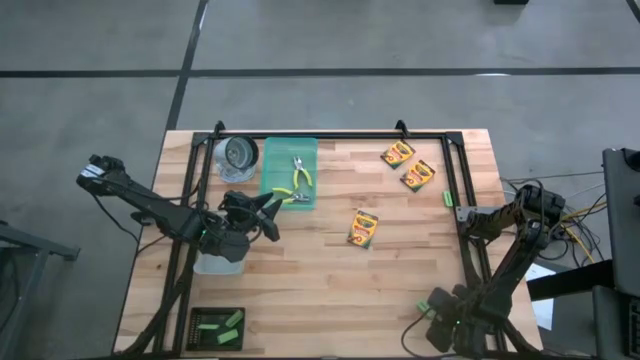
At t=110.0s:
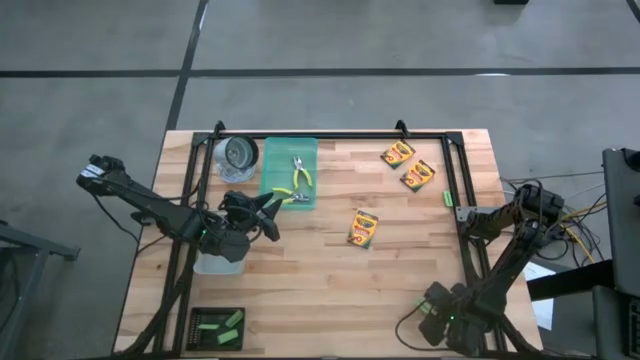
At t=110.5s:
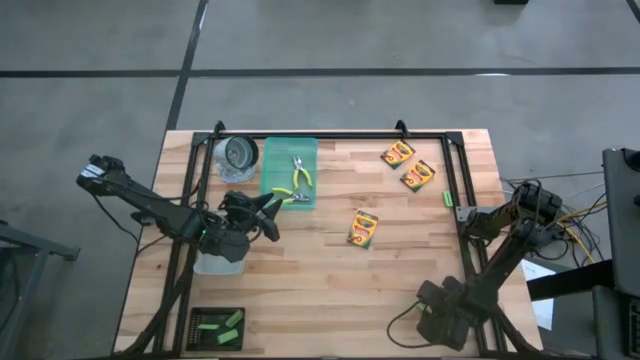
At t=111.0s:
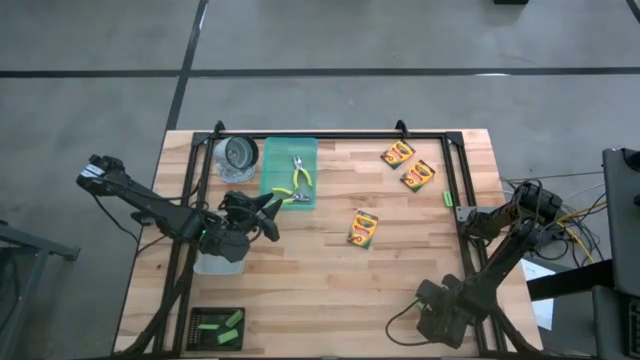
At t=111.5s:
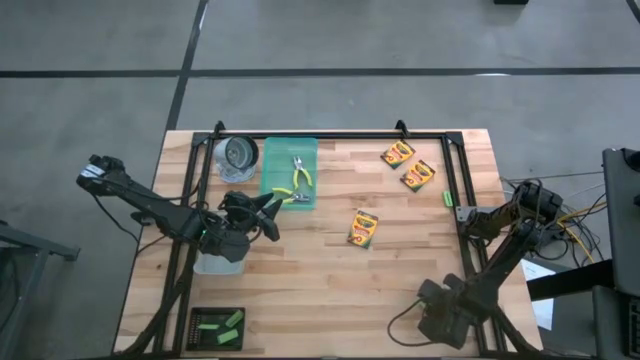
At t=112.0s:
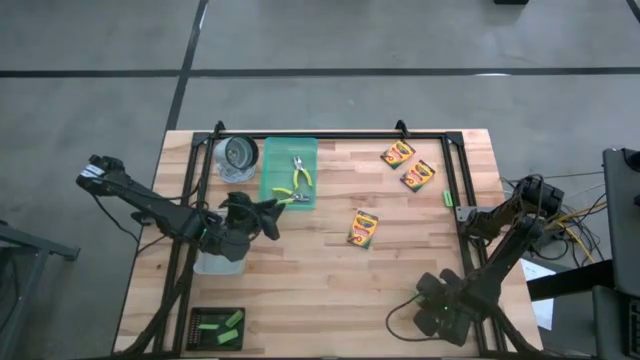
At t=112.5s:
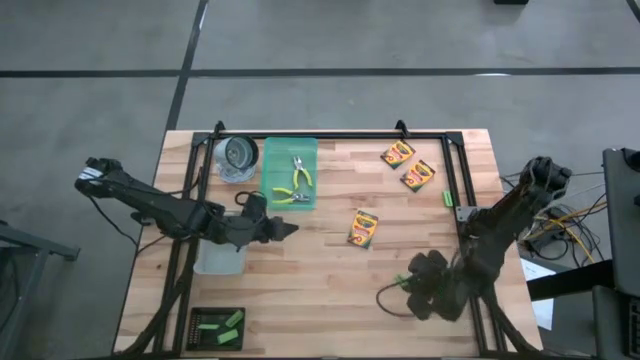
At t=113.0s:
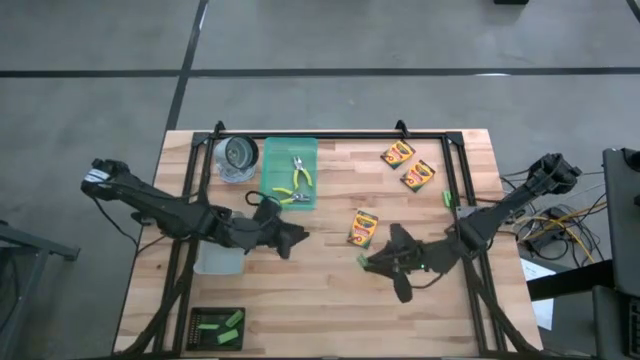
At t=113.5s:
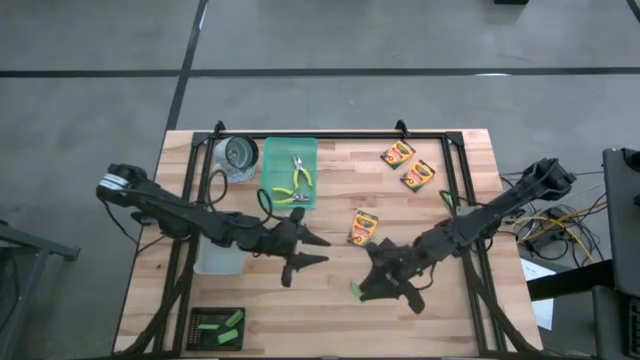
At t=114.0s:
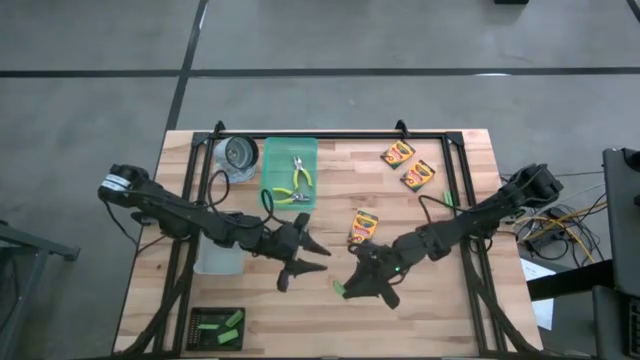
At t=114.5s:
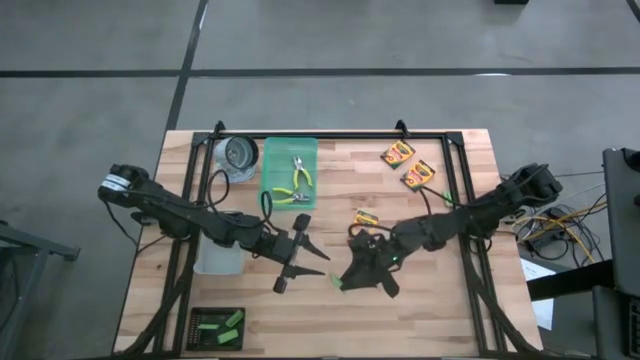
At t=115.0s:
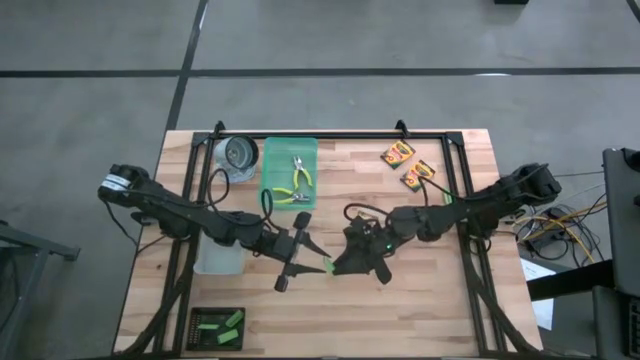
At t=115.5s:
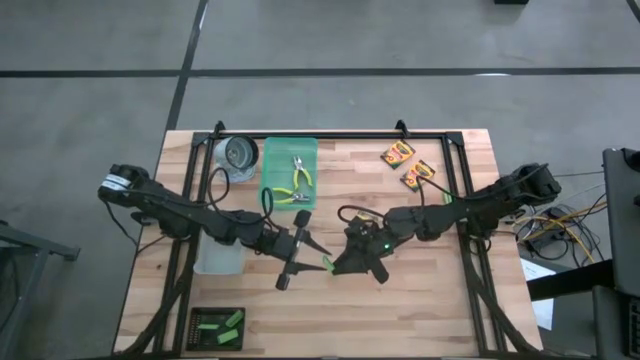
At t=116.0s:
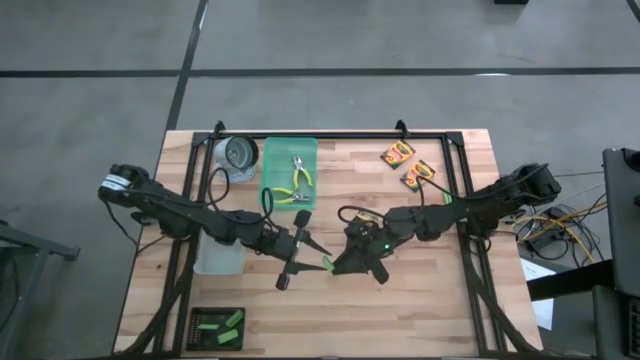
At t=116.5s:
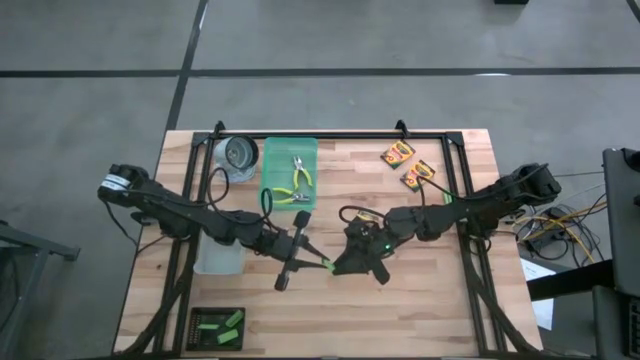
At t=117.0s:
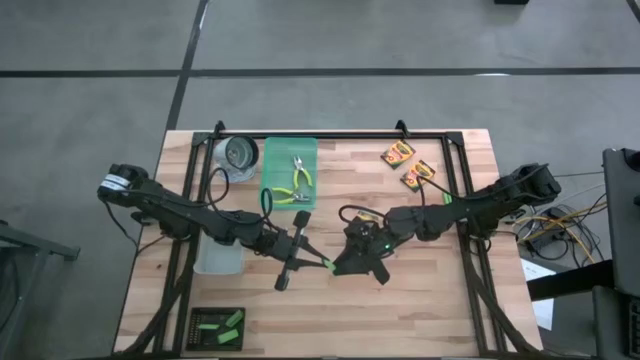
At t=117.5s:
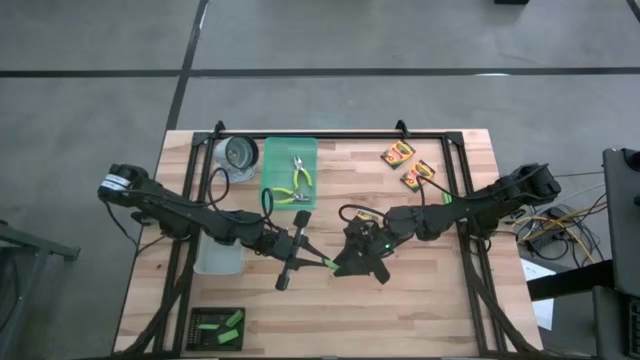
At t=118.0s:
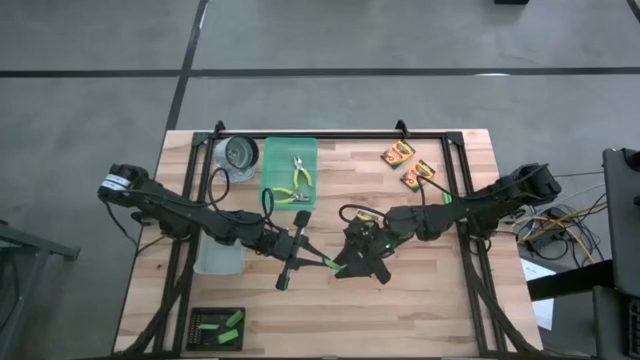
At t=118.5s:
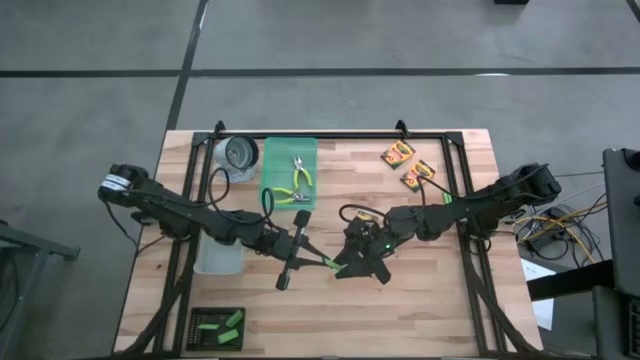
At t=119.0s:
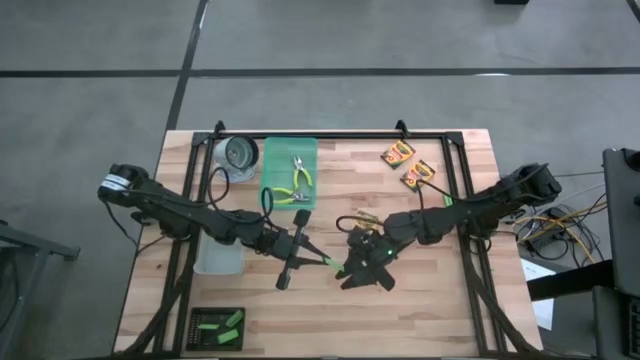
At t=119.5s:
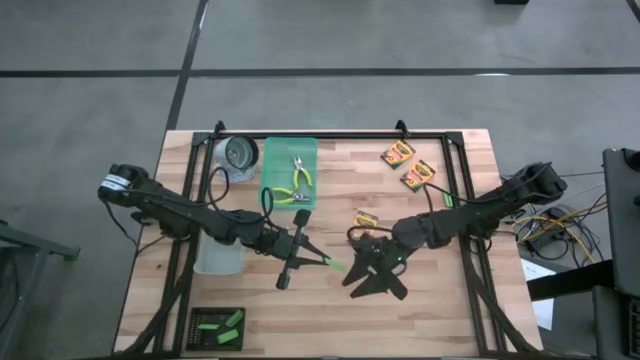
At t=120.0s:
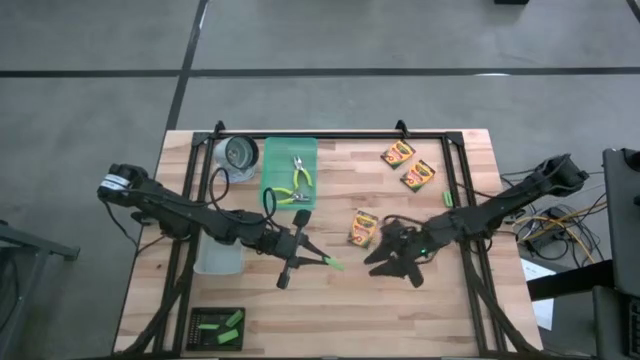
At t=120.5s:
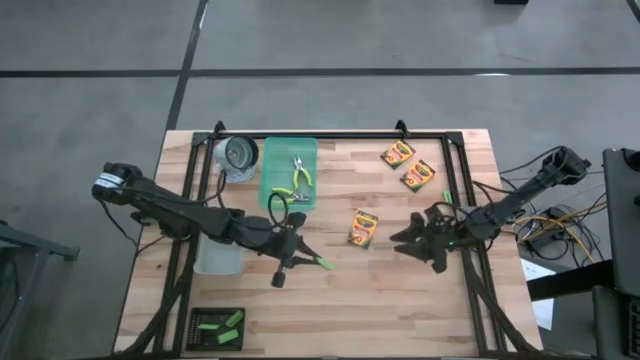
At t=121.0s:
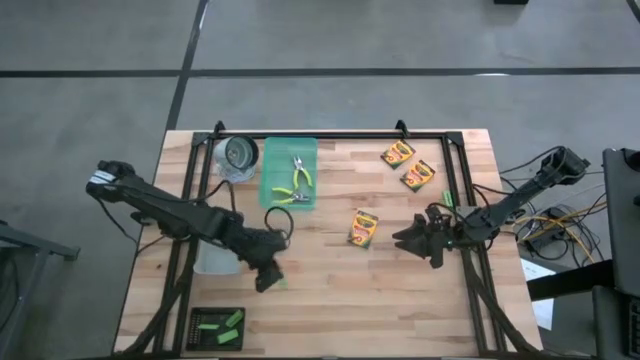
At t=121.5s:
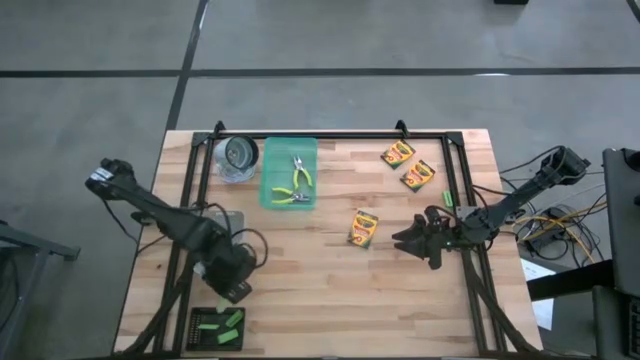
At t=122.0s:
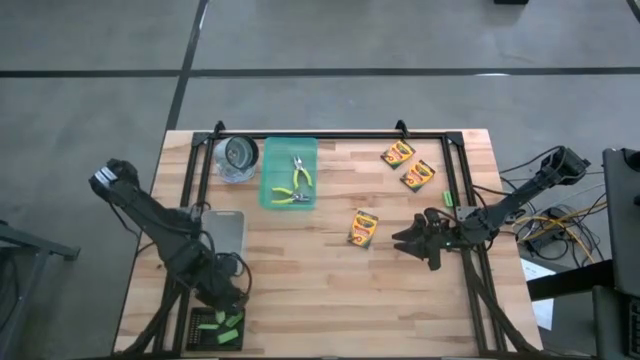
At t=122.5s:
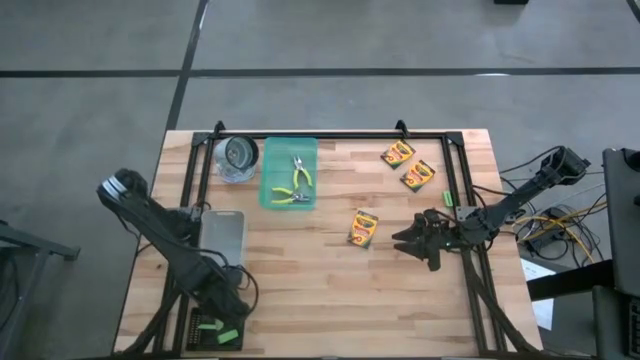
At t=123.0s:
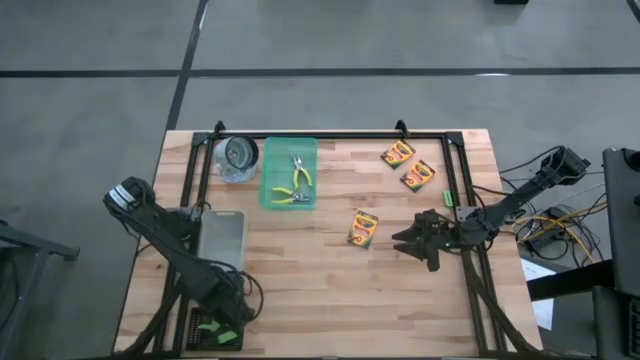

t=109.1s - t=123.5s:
Task: Pick & Place School Supplies
Put the green eraser into the black bin

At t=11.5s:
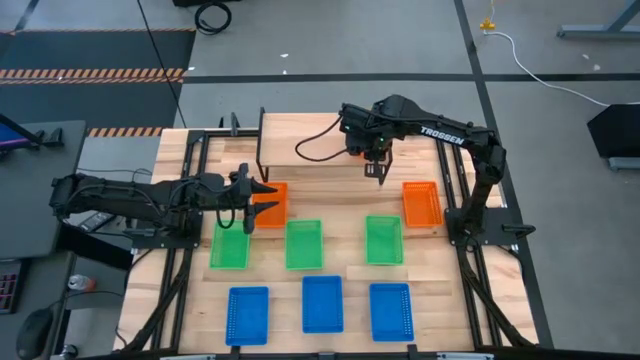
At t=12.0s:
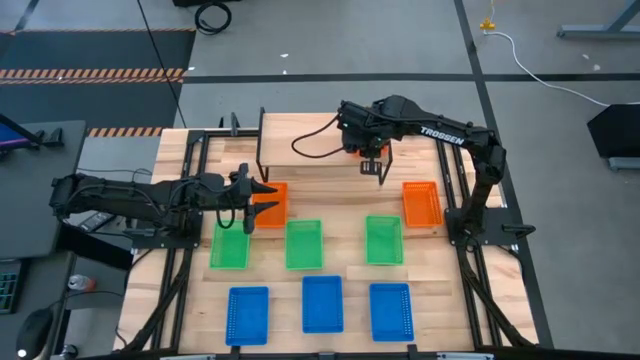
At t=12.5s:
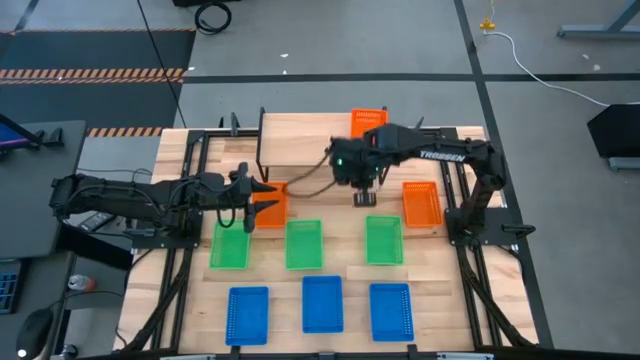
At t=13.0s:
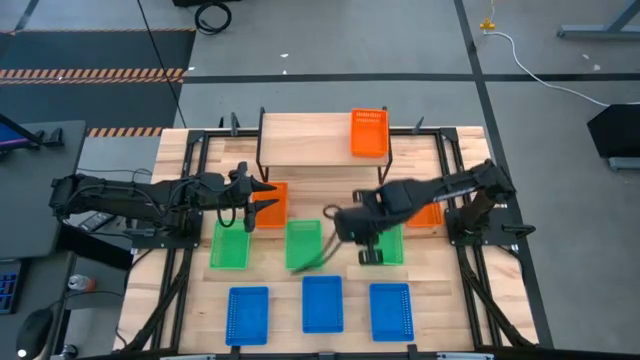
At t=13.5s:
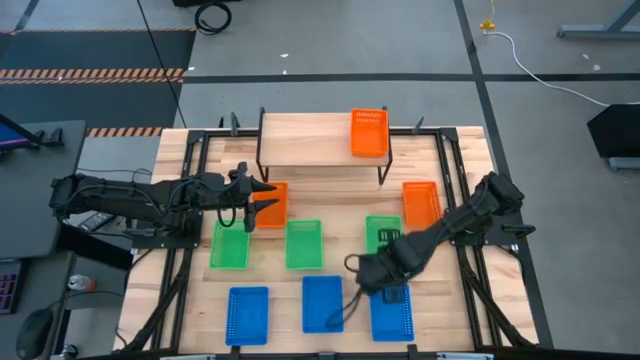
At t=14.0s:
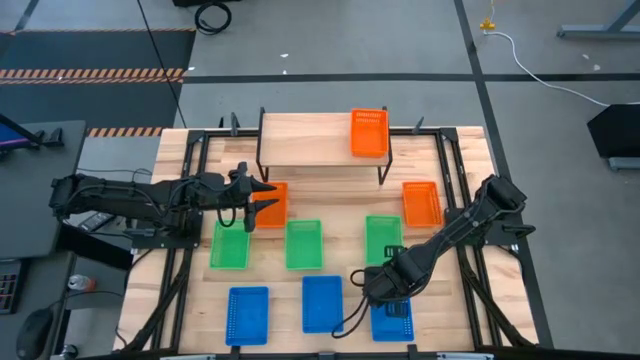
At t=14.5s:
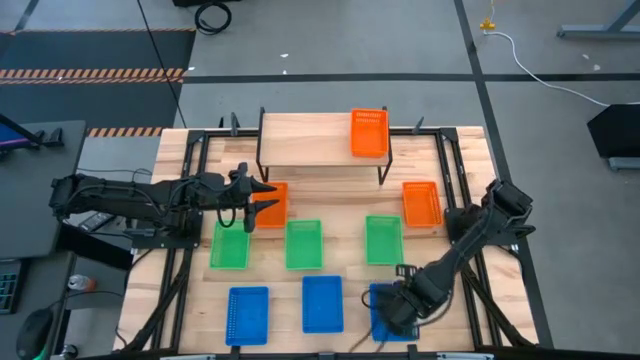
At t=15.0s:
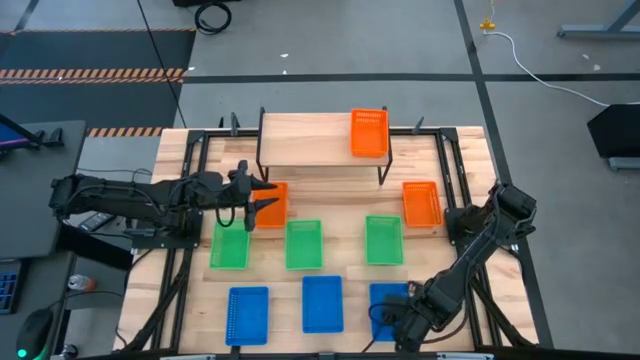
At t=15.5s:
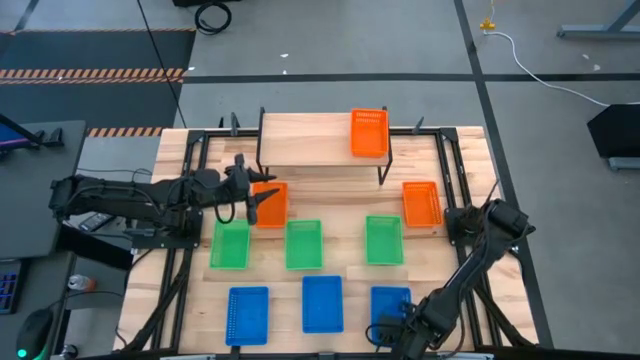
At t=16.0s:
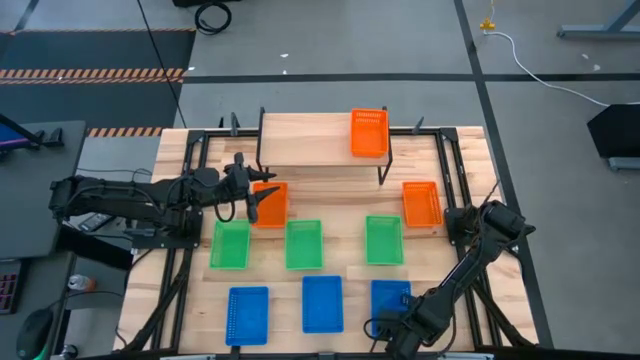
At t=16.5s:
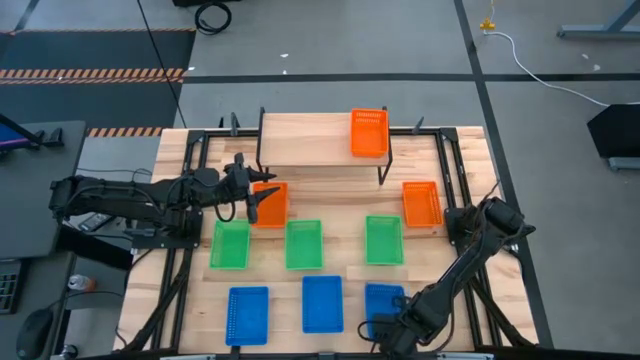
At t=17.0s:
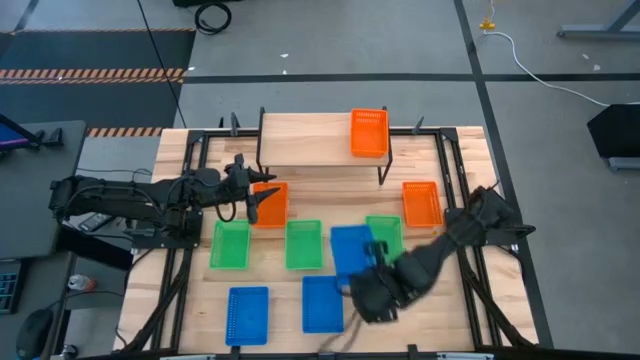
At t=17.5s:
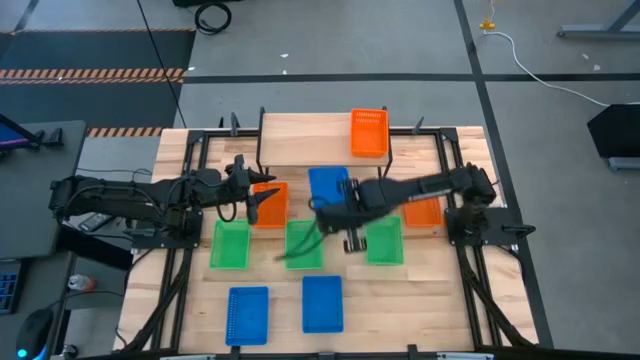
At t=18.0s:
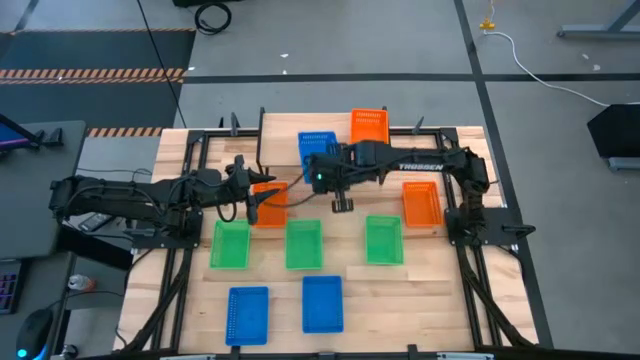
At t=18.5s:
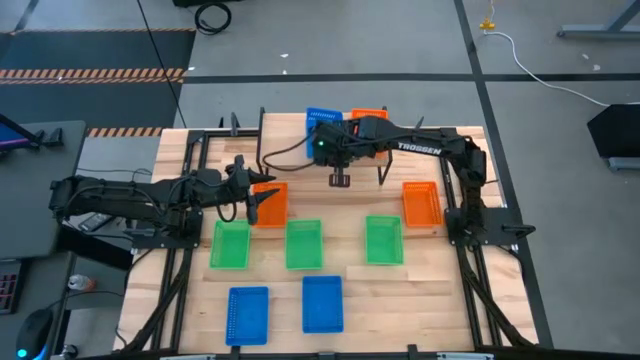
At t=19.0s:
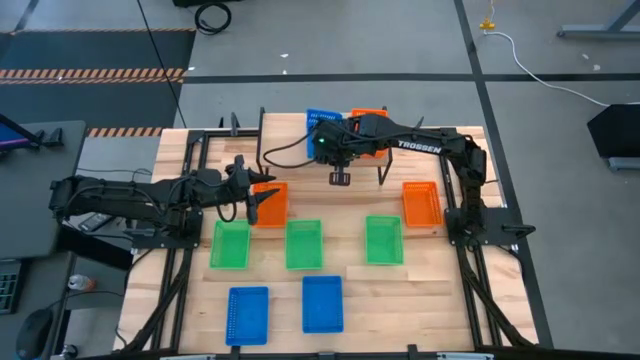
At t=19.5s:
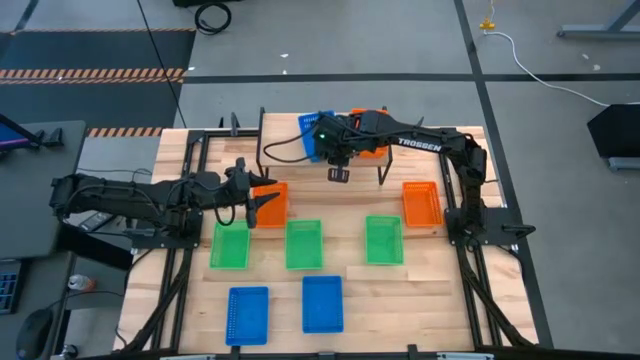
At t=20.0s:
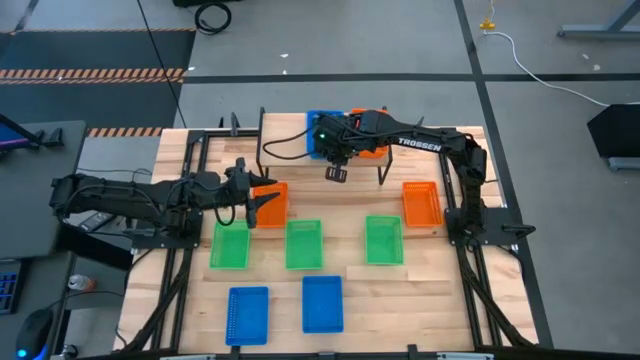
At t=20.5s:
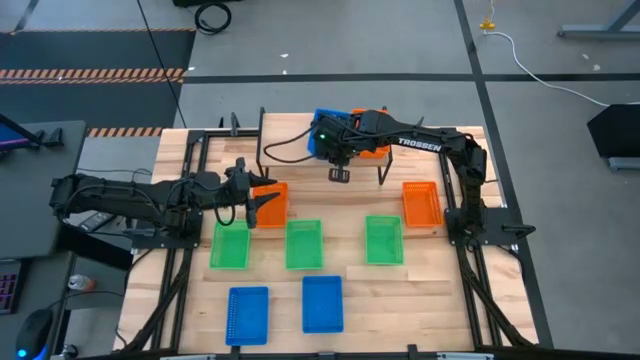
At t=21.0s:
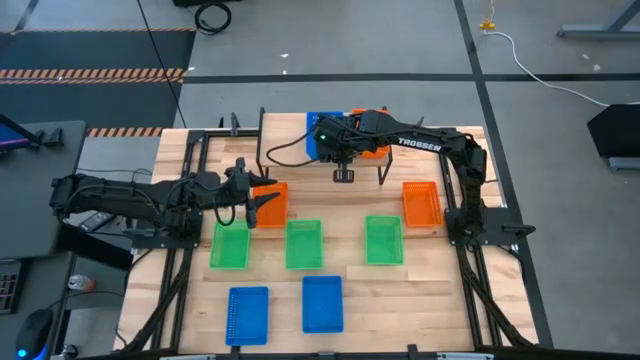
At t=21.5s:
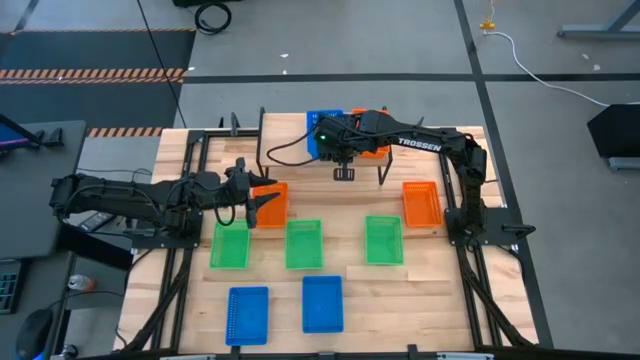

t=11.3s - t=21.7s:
Task: Stack baskets on shelf by color
Put the right blue bin on the shelf
